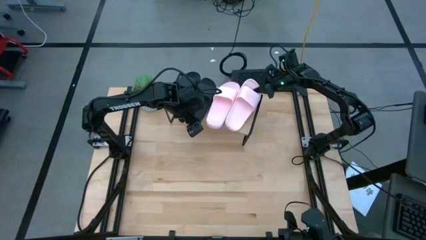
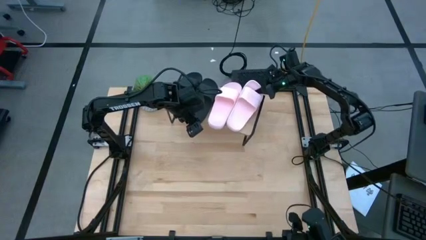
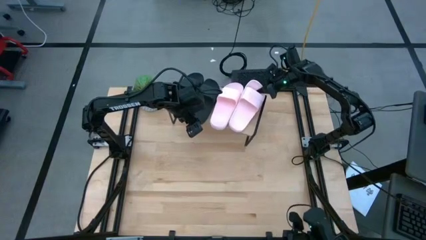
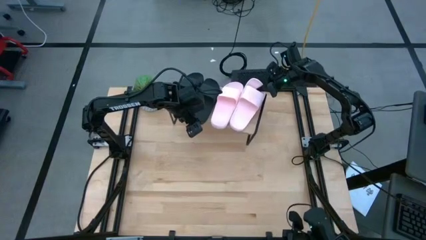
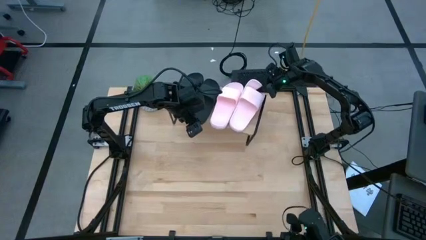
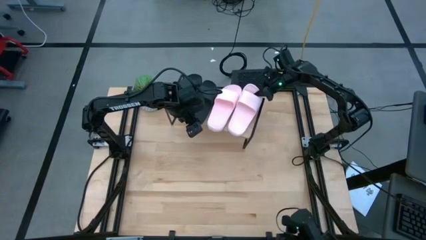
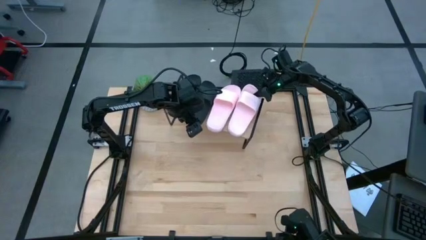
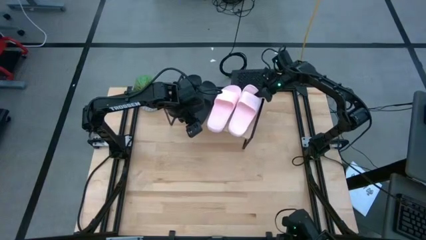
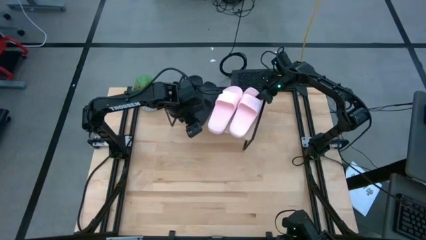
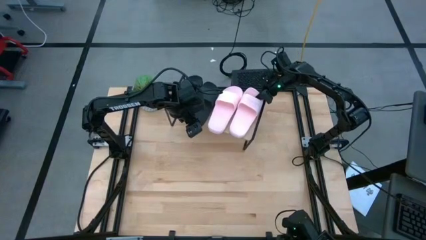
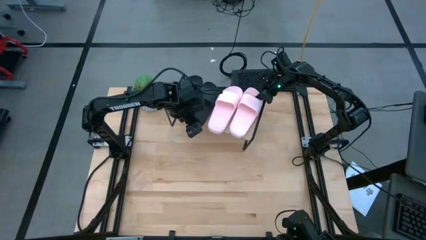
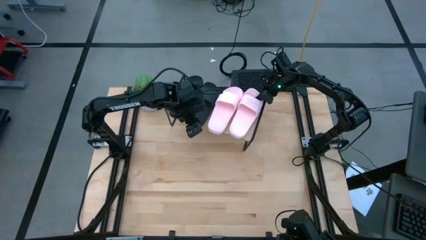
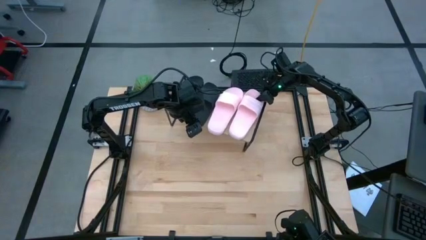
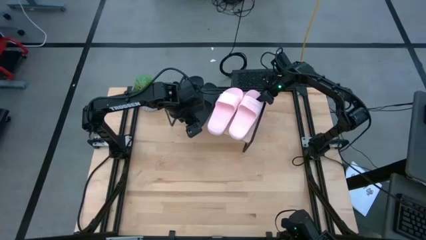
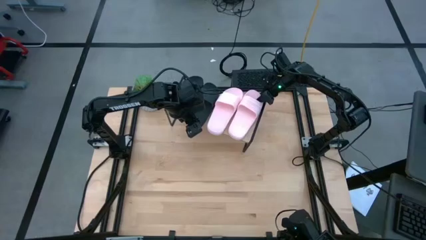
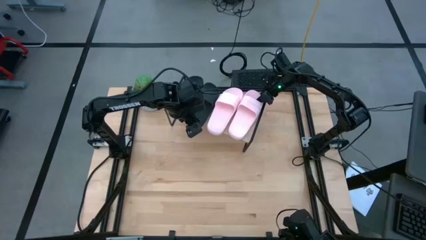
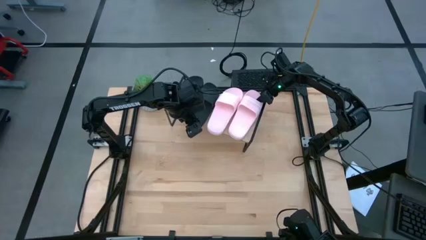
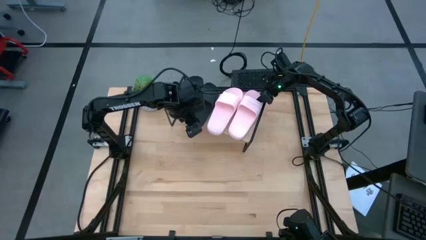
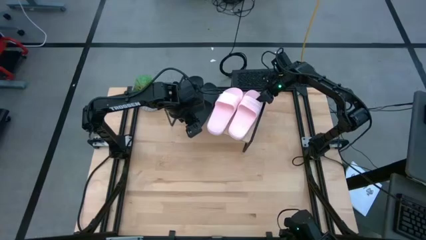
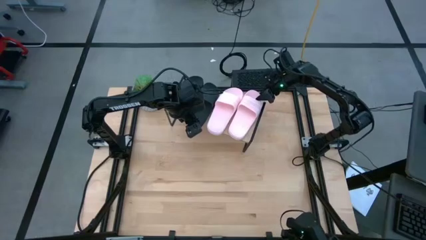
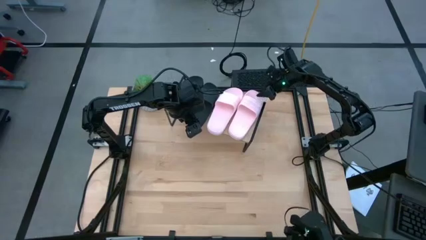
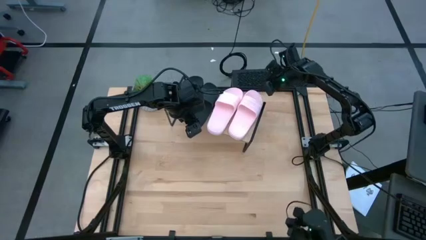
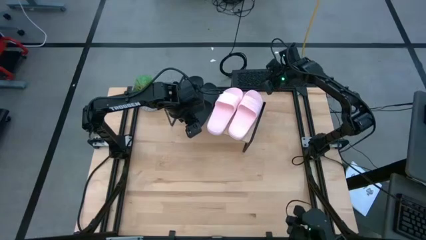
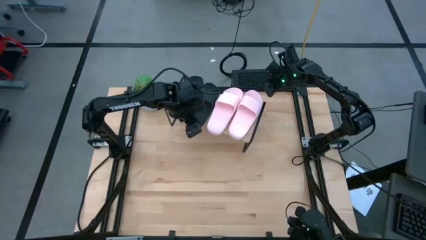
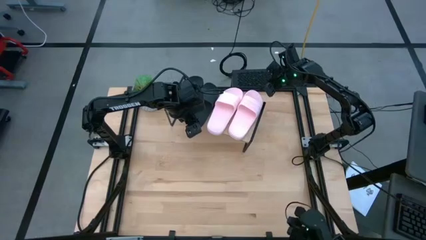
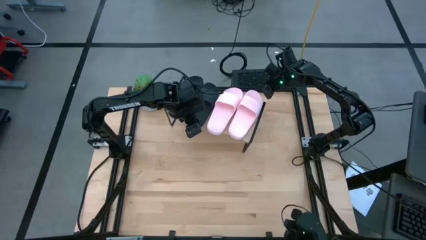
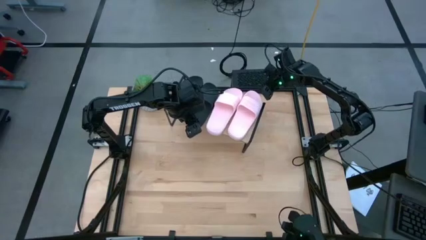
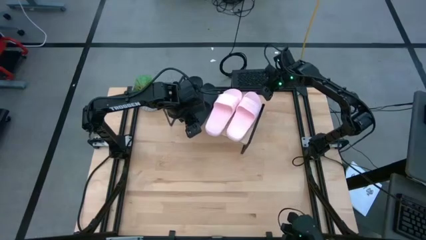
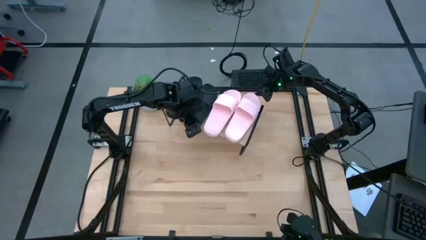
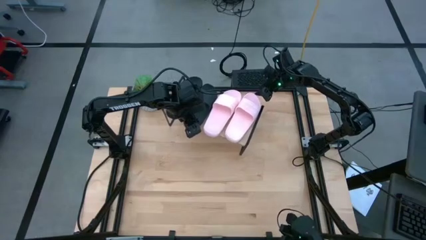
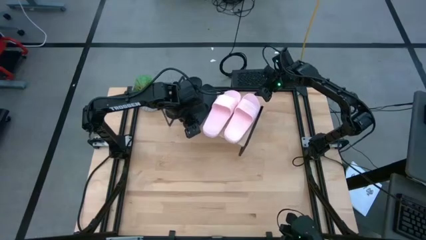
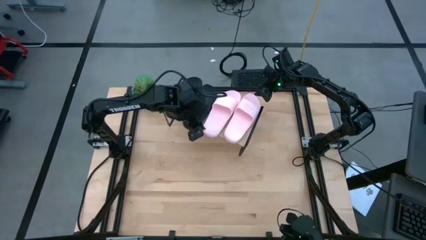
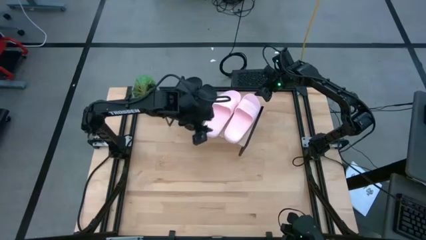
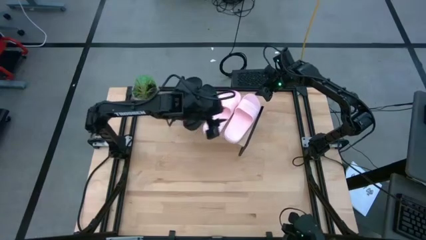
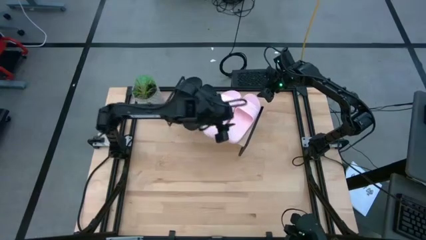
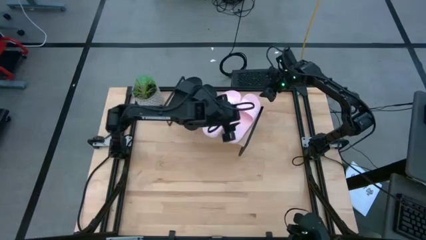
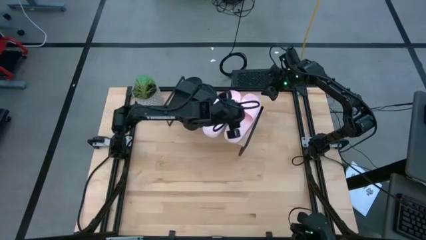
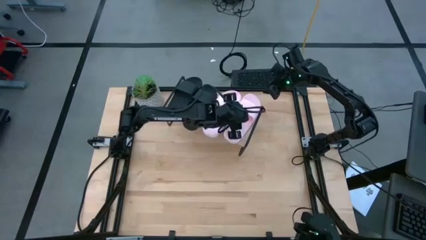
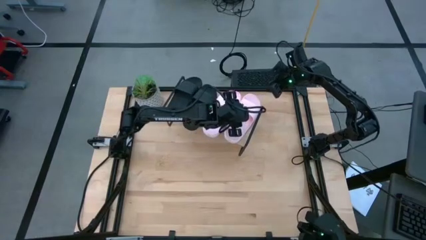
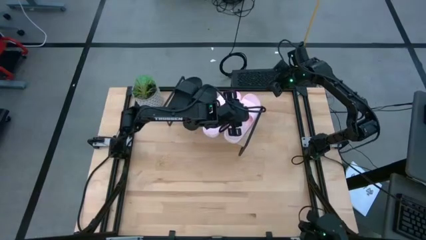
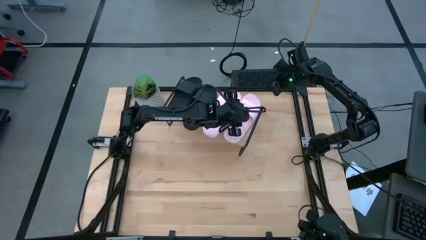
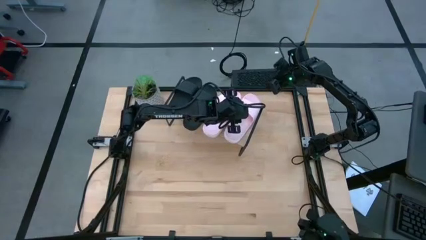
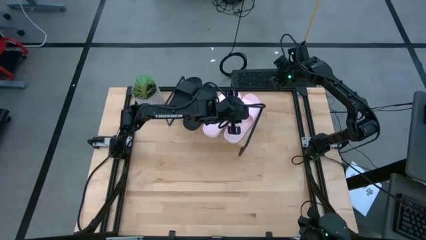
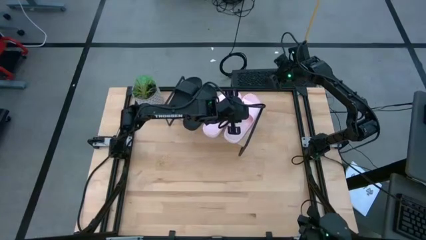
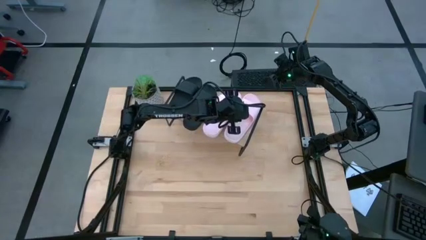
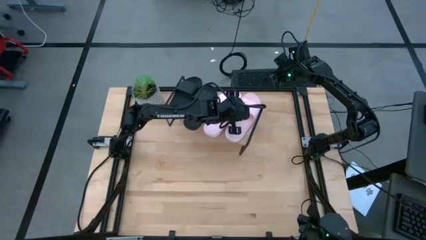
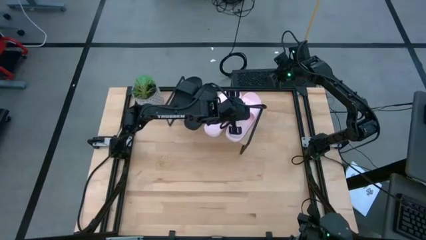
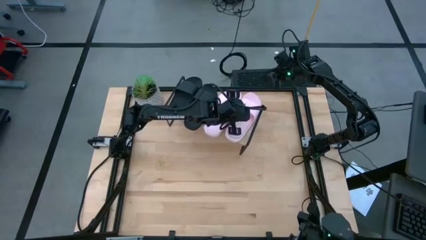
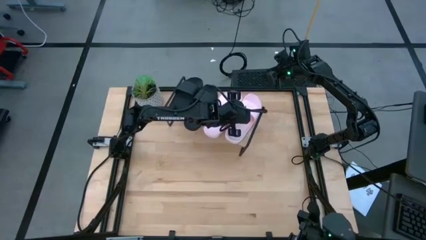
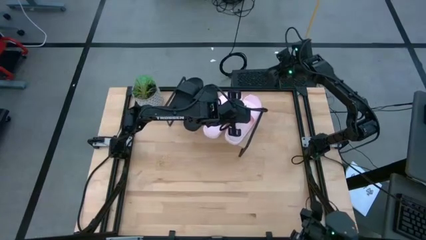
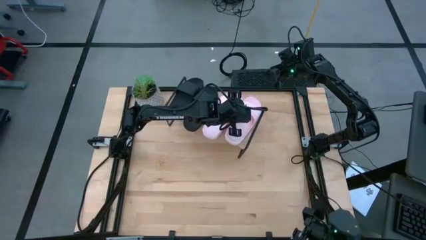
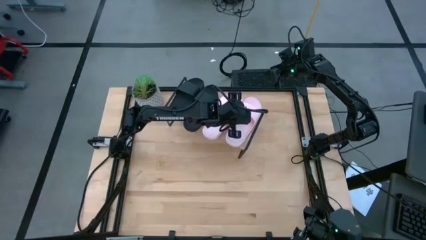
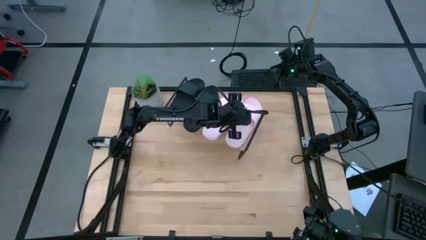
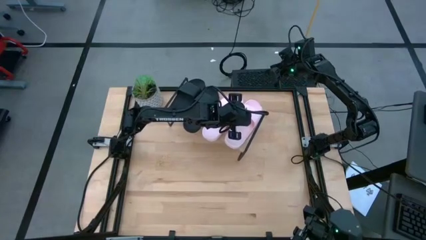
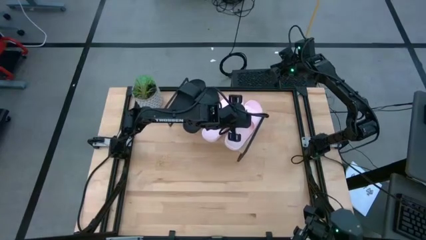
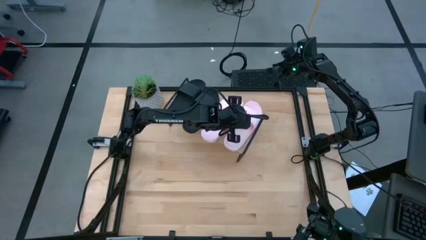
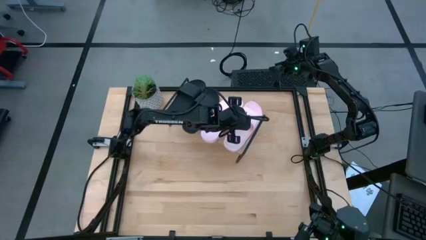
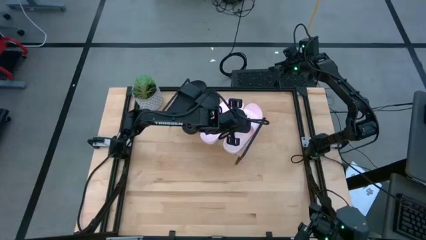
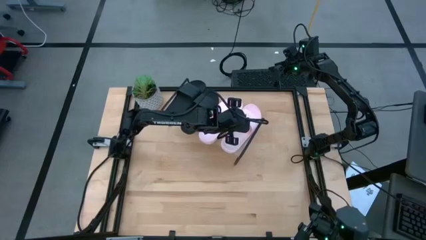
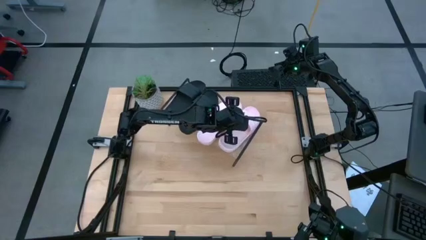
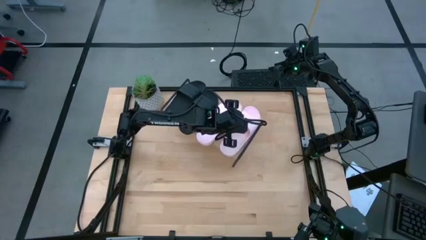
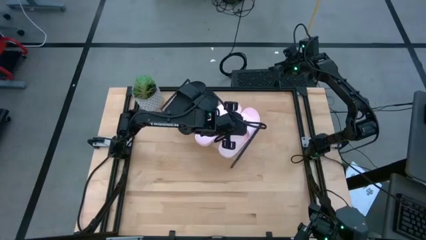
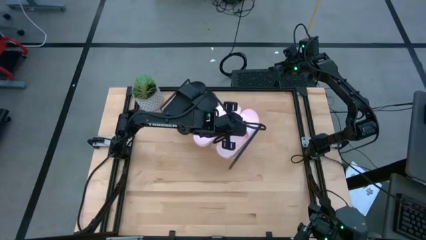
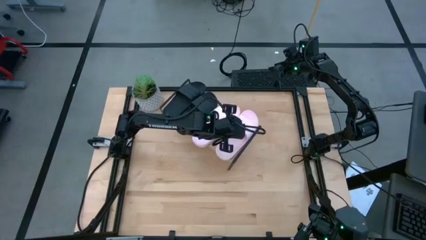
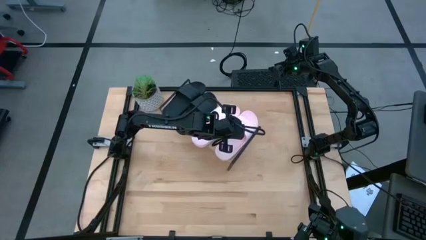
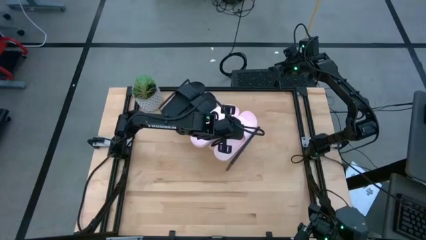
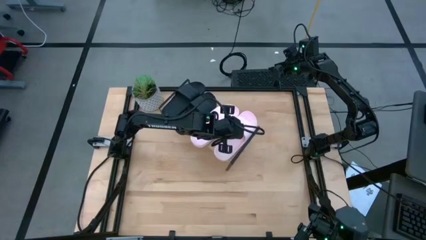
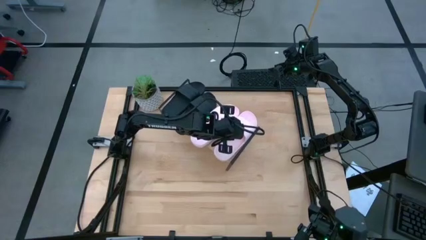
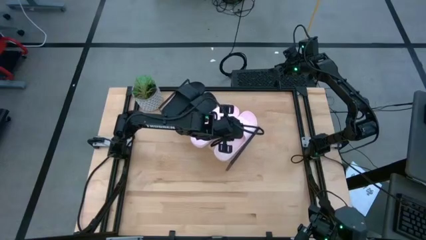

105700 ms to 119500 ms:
Task: Pick and place slides into the shelf
Put the pink slipper on the shelf

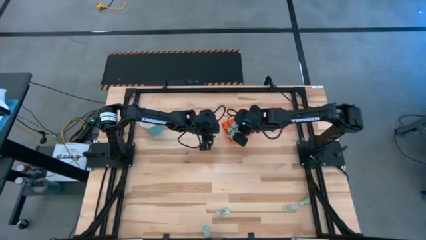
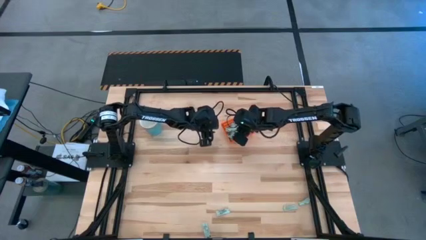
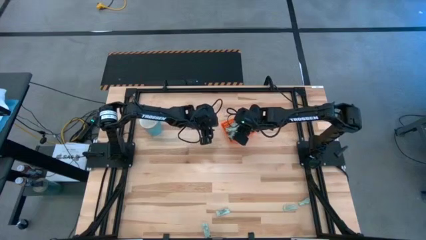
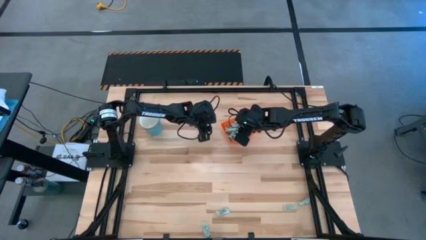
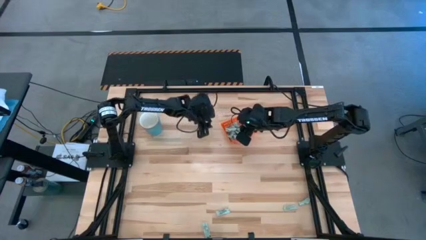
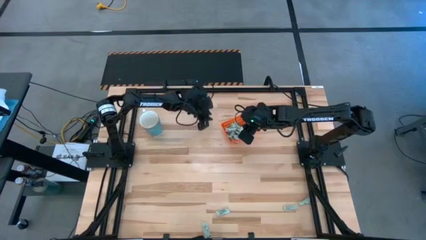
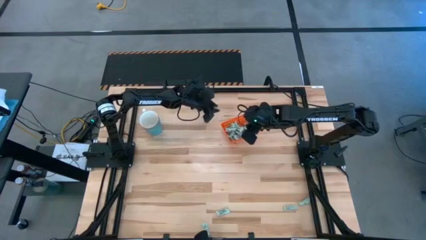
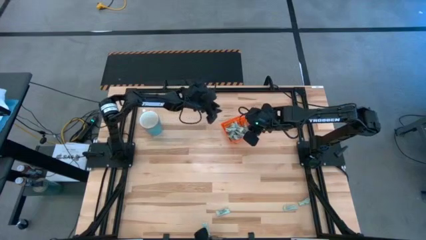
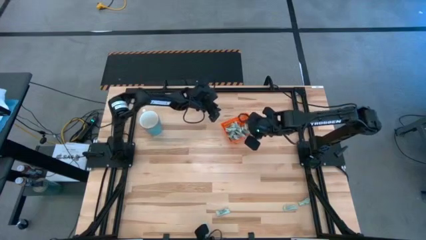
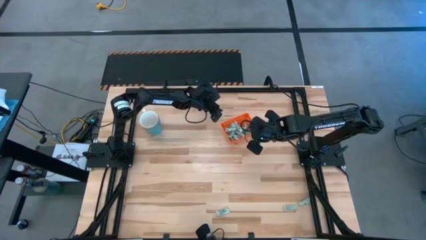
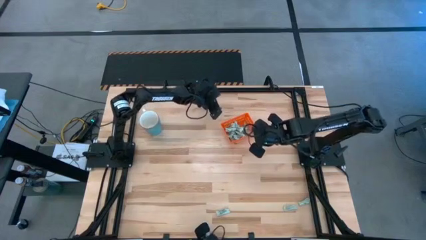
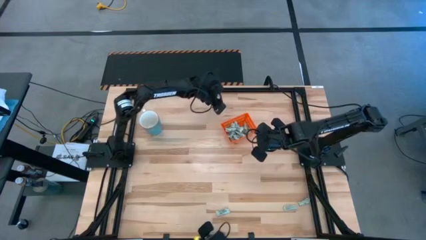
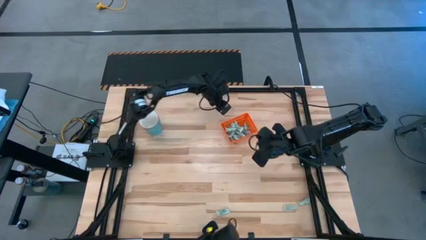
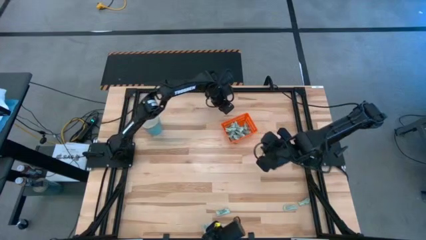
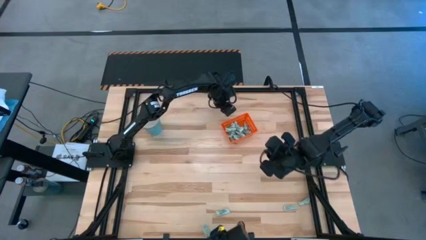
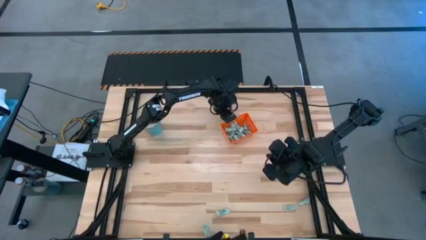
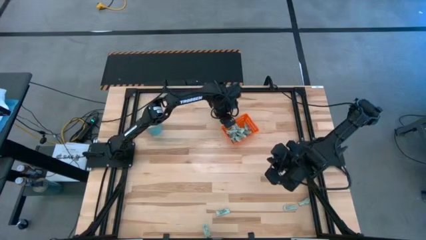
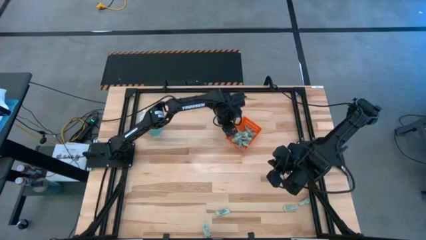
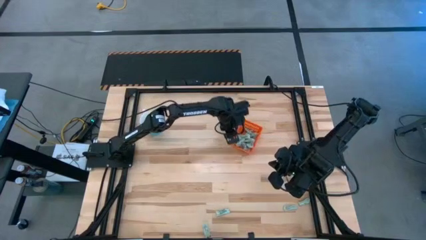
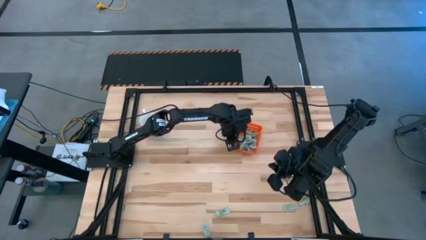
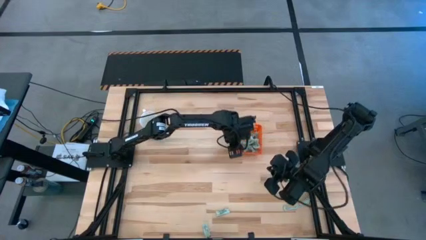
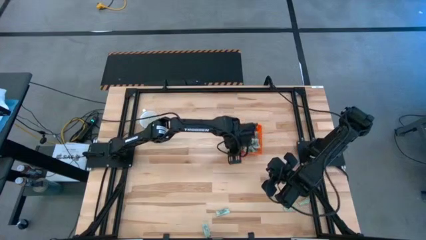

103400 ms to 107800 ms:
Task: Pick and place Stevia / Truvia into bins
Adjust the orange bin
